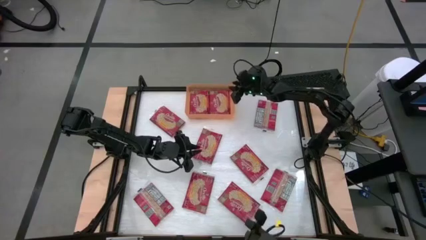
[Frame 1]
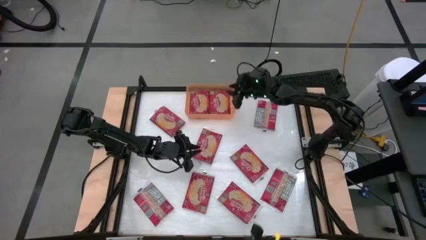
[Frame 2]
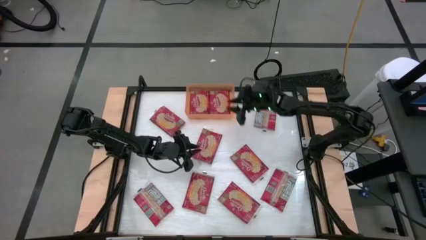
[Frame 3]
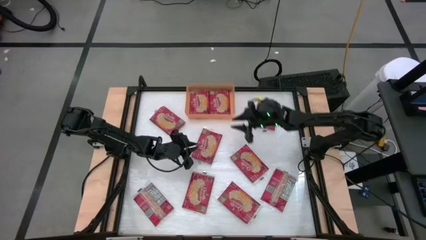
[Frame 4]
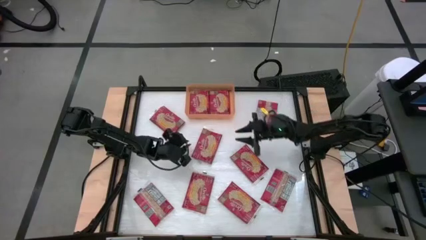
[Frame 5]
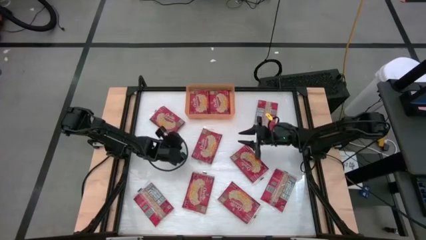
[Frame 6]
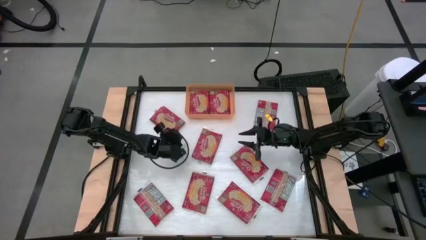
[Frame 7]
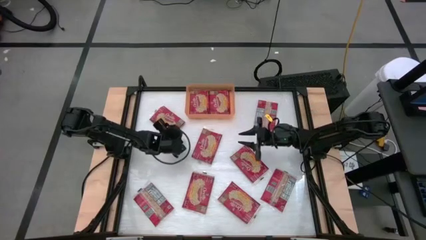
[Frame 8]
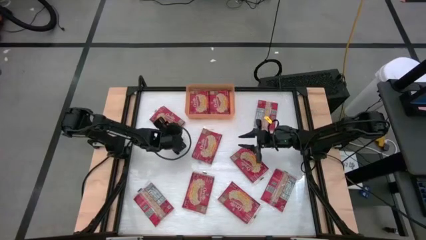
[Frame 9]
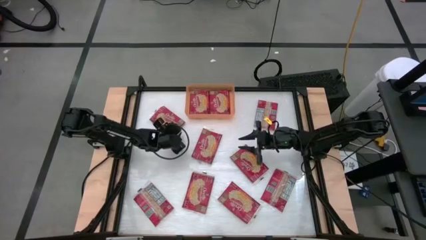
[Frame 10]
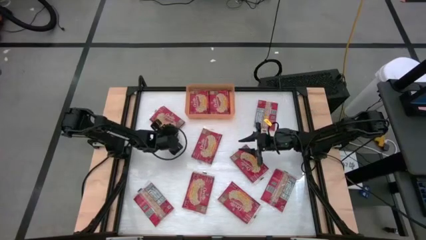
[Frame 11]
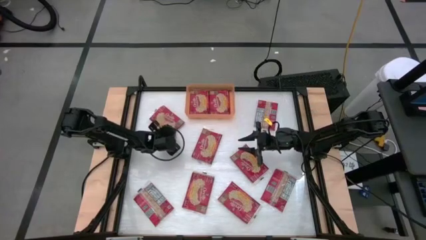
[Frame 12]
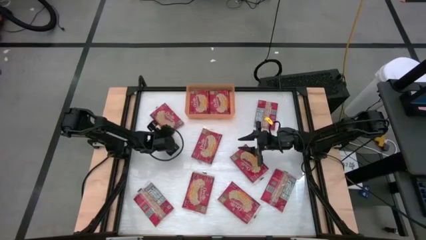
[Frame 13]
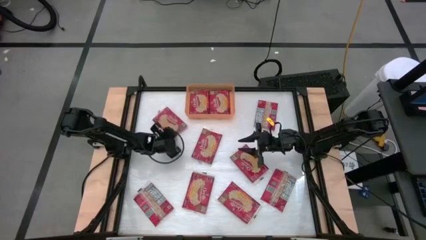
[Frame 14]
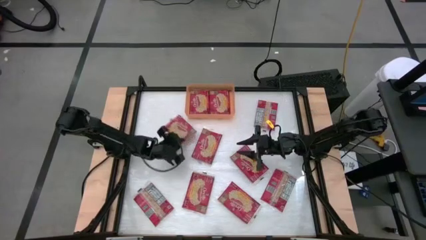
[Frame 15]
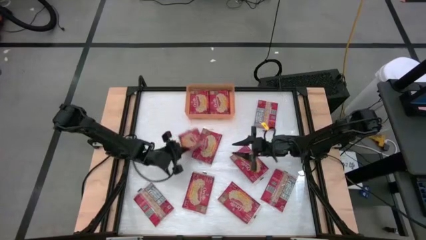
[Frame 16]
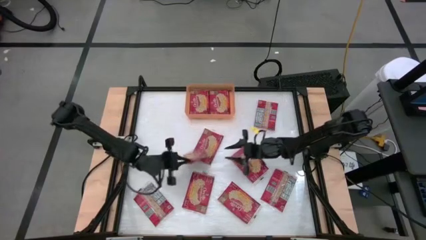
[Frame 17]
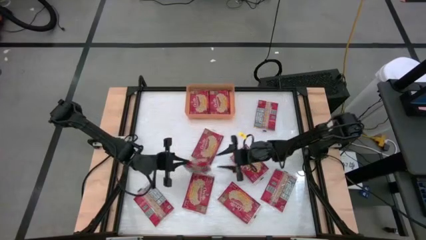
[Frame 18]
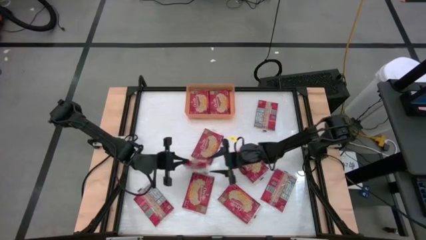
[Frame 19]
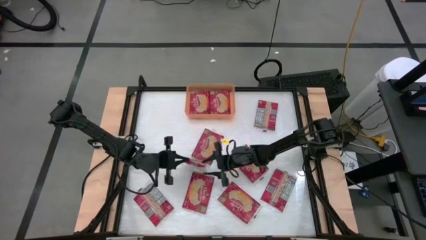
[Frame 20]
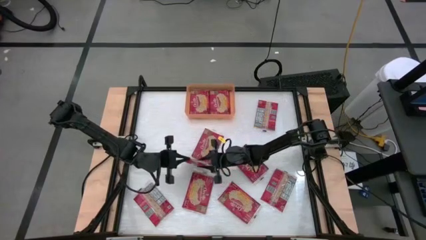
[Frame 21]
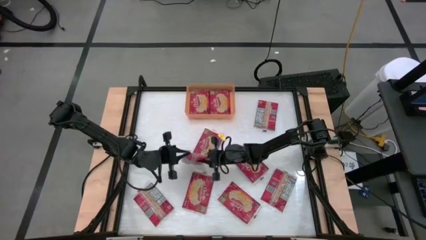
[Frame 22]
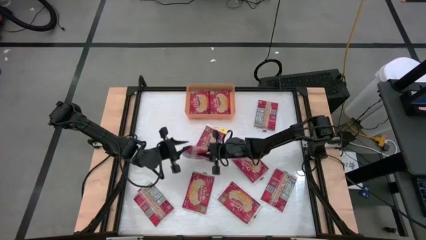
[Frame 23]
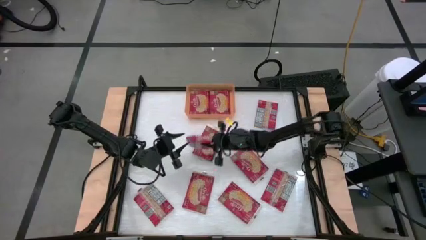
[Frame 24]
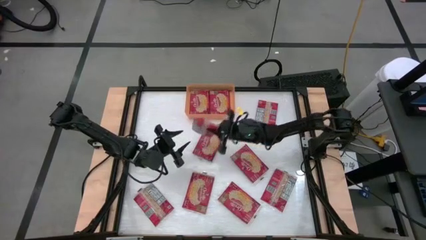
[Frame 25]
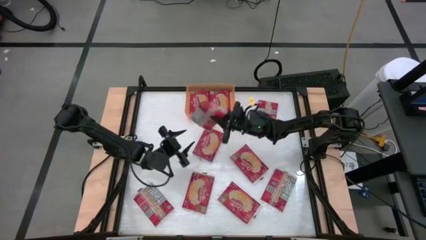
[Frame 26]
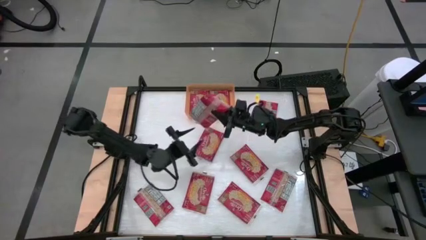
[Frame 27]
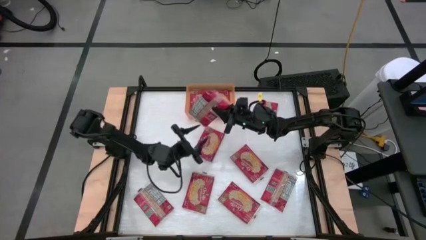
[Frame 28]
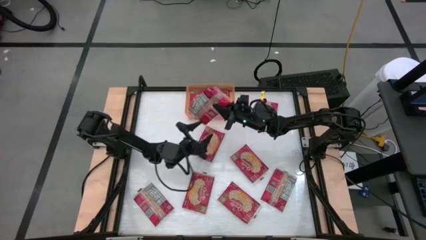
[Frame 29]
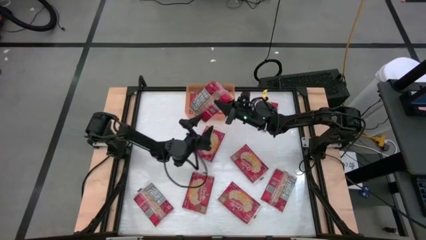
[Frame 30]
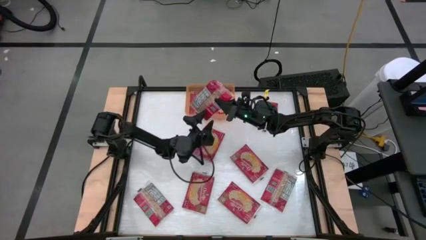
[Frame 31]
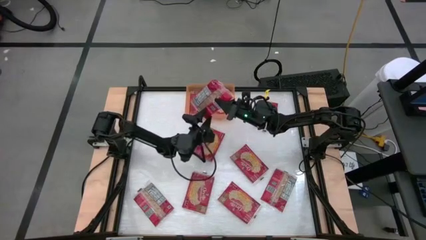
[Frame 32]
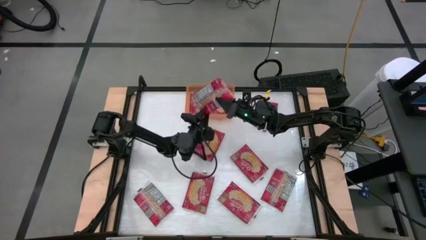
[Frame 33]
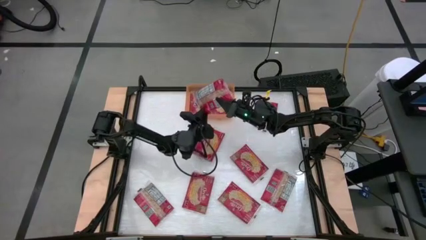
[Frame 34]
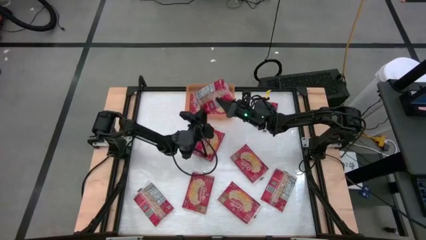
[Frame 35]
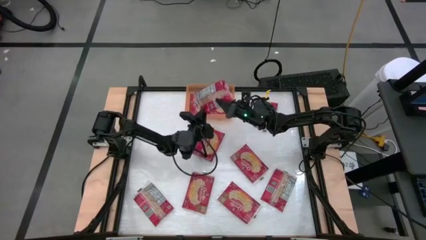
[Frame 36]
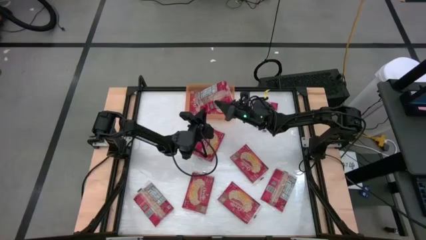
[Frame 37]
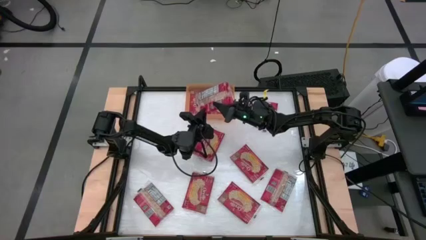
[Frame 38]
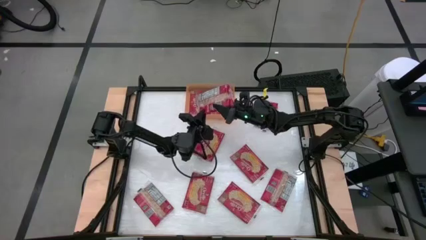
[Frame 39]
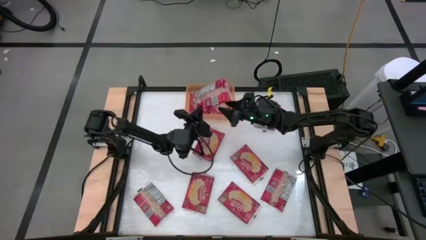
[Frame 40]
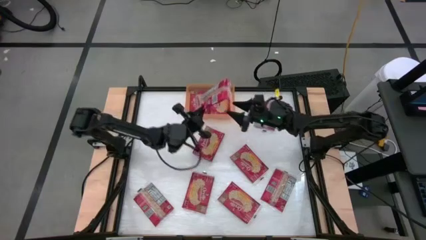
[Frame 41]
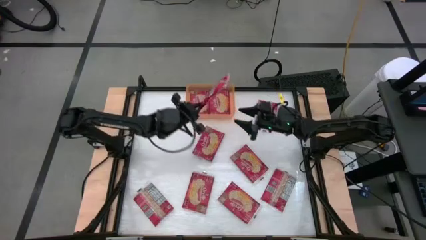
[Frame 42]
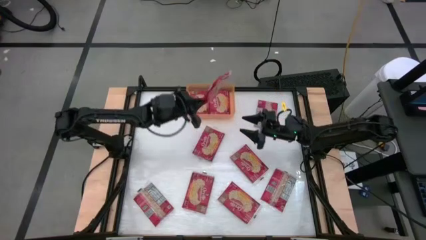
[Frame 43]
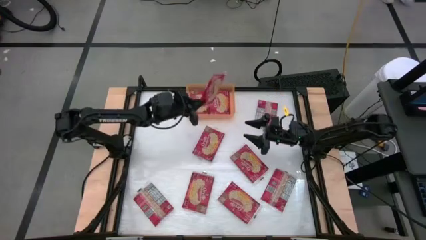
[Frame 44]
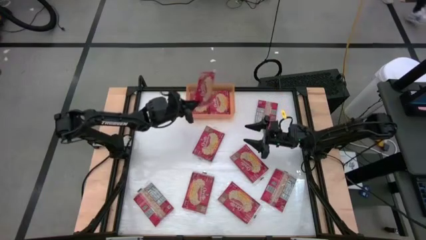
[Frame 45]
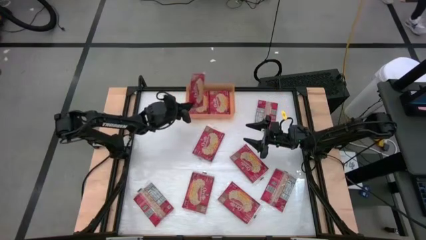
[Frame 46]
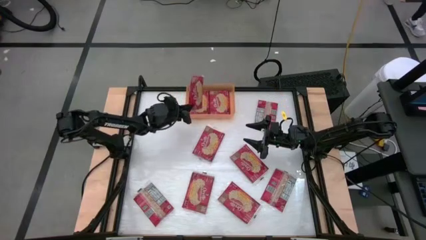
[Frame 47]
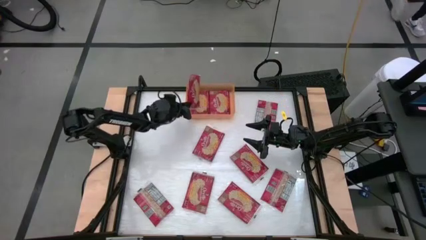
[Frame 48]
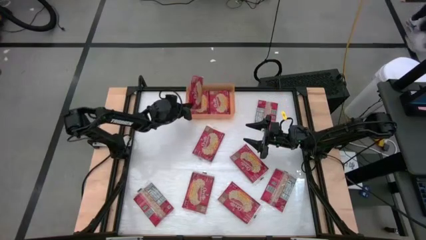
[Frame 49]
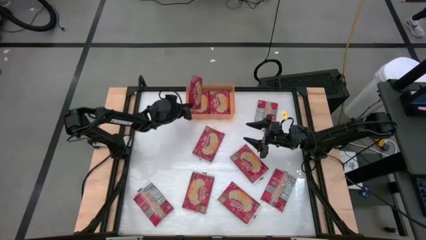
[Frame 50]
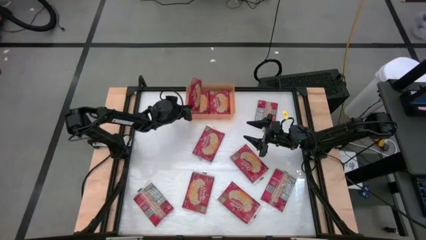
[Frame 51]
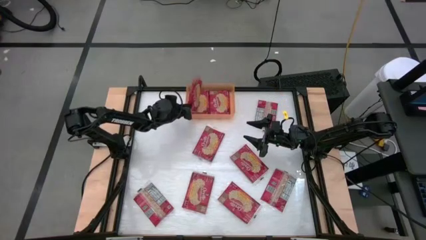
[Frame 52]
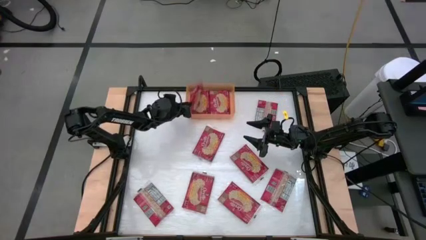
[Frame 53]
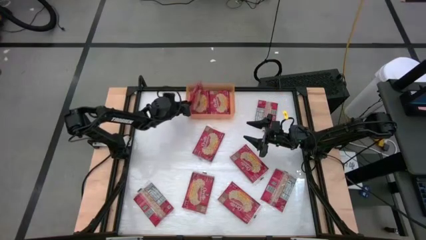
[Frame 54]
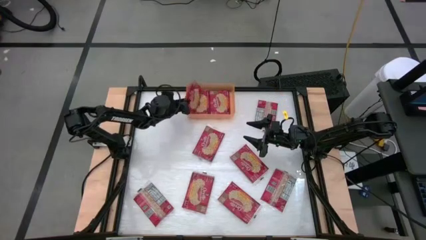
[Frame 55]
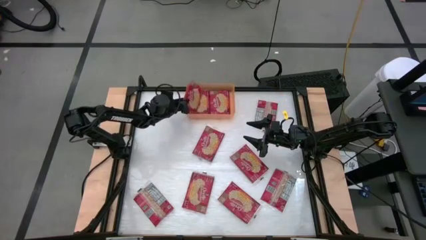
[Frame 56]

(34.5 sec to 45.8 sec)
Task: Sort popcorn bags into baskets
Put the red popcorn bag into the orange bin

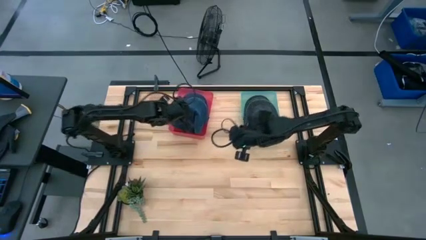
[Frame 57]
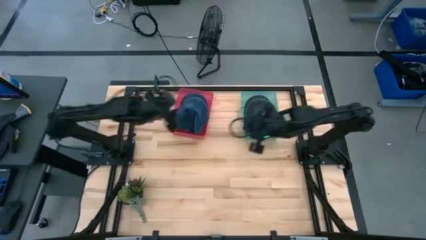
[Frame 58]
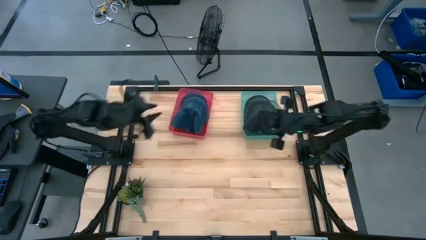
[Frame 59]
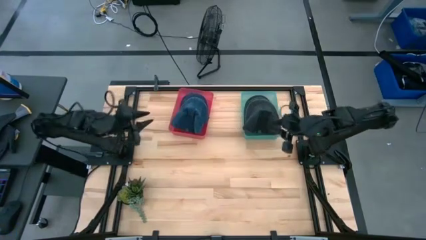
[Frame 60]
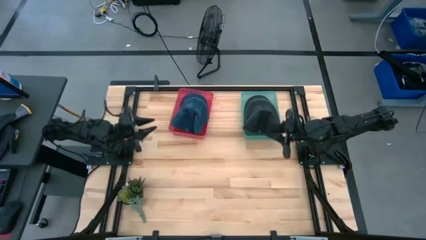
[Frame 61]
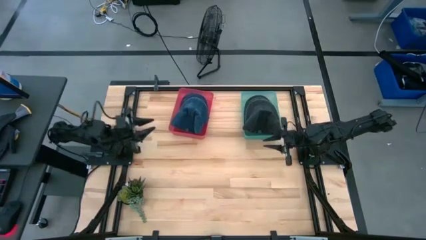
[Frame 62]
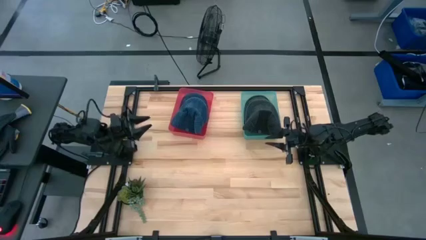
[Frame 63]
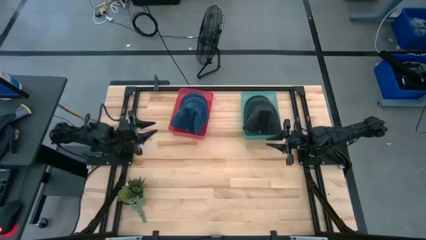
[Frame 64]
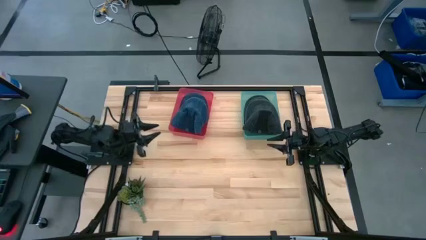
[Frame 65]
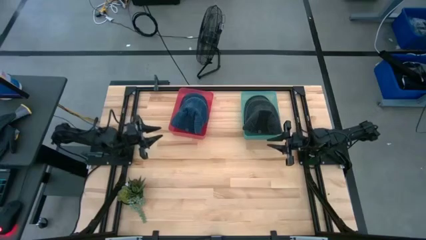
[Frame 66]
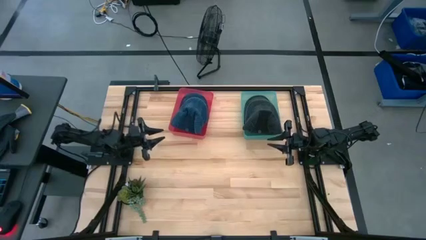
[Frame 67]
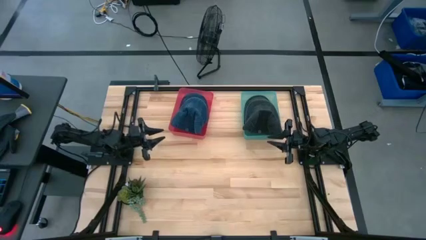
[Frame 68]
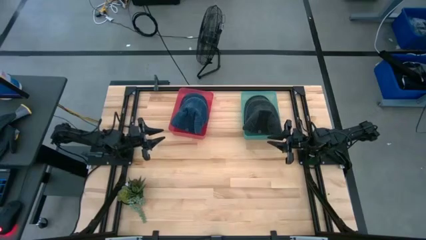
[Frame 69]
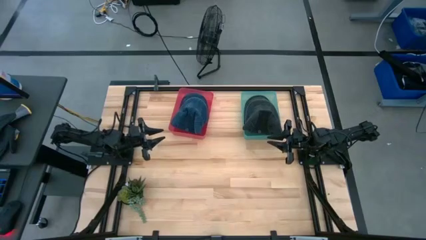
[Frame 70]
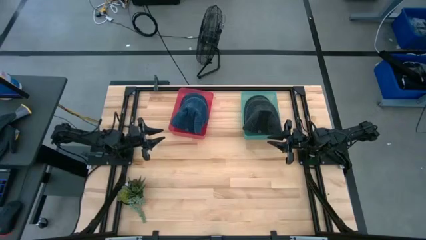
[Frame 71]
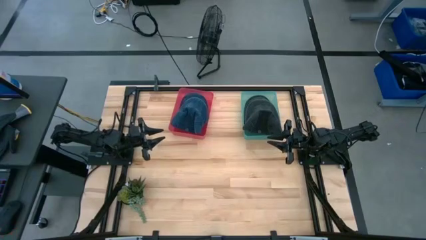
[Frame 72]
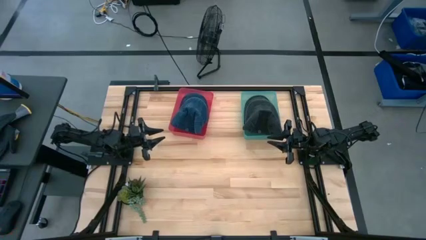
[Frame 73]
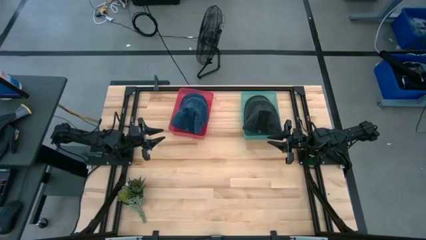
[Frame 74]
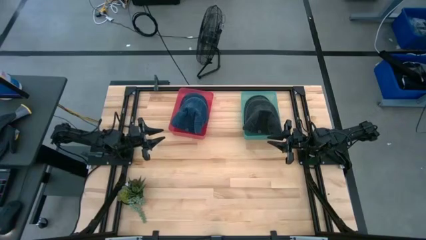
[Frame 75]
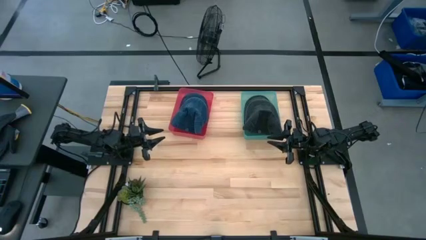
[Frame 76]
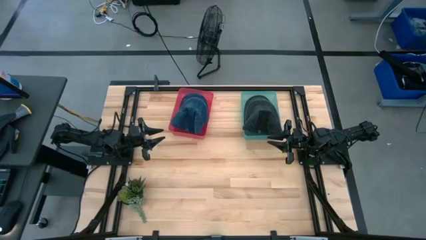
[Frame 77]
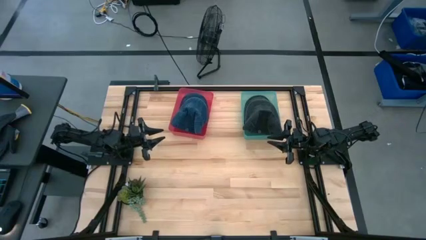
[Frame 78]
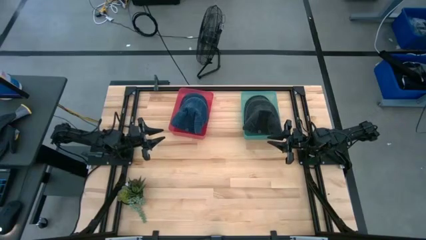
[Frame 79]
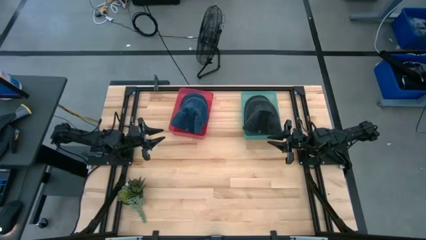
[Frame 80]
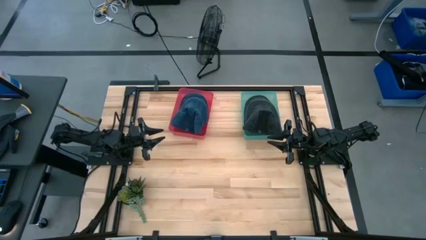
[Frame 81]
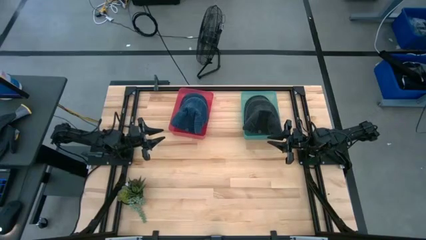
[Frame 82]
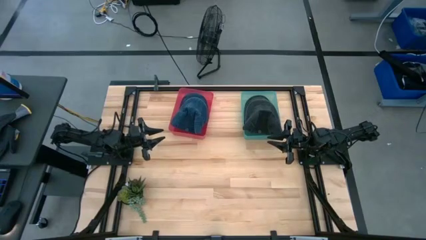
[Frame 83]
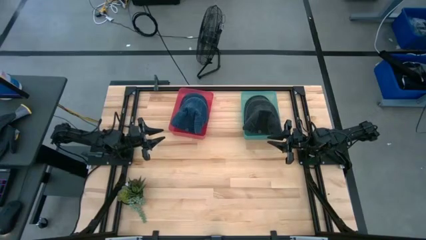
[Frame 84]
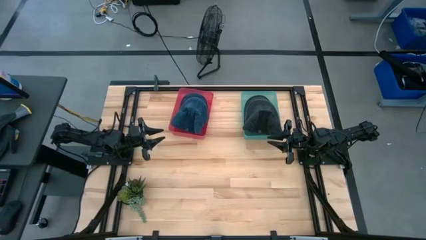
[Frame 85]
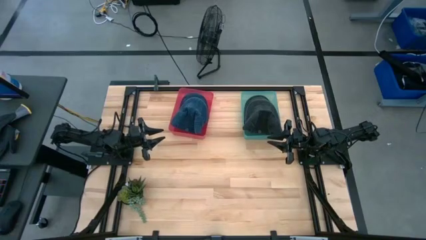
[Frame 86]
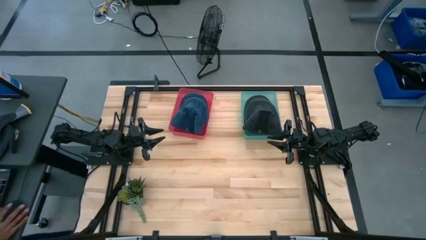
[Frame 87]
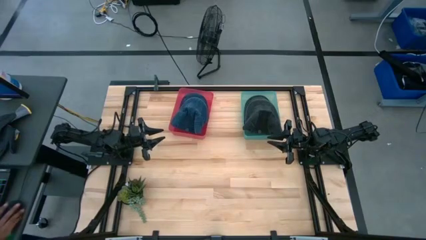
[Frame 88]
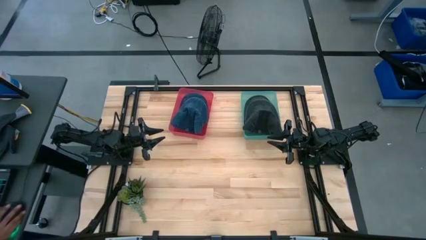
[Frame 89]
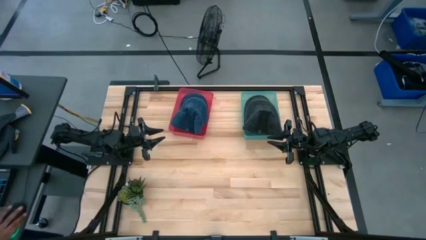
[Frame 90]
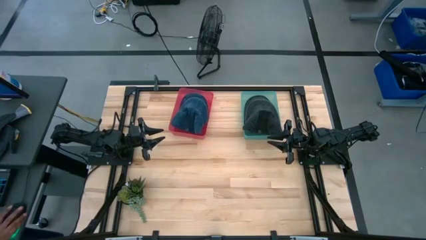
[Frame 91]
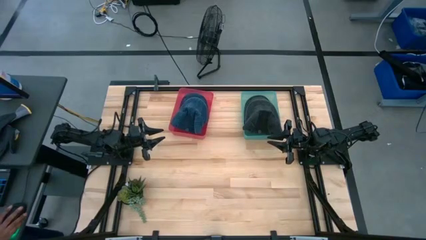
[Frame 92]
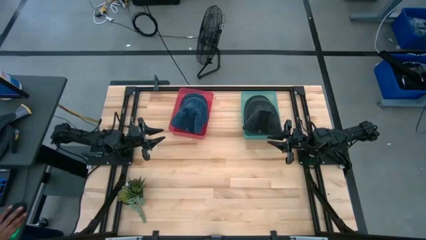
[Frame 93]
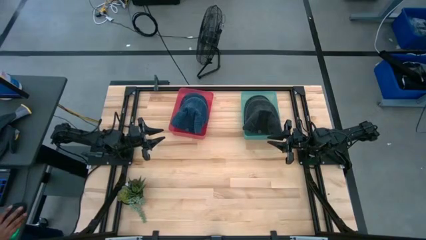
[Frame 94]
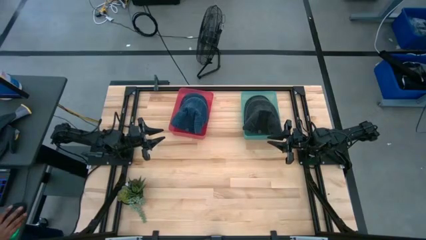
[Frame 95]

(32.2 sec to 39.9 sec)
Task: Pick & Place hat
Return to Home Position
